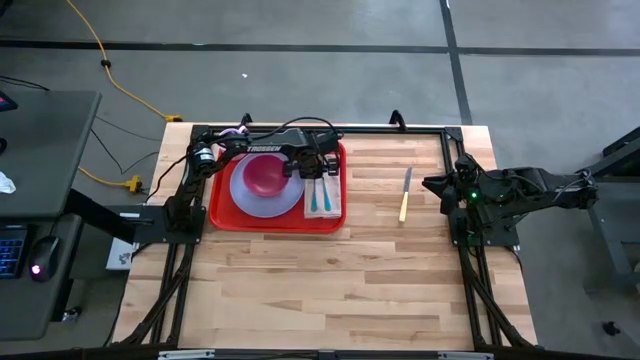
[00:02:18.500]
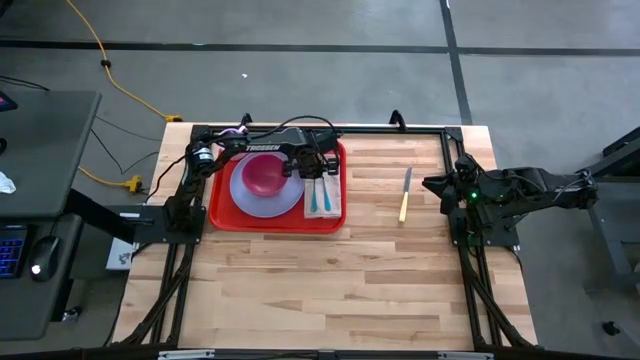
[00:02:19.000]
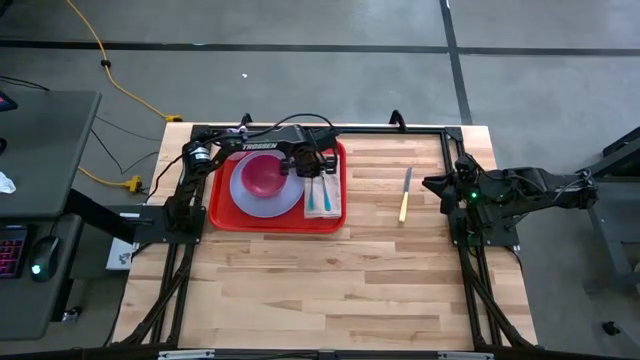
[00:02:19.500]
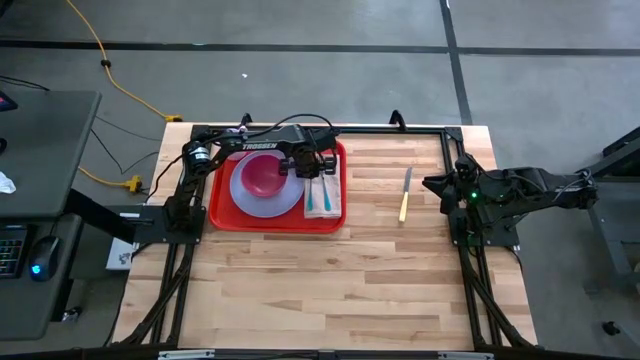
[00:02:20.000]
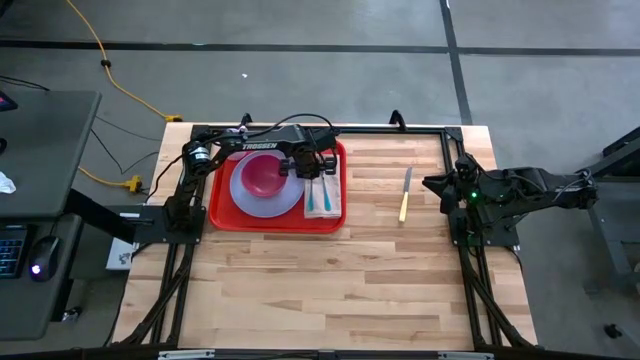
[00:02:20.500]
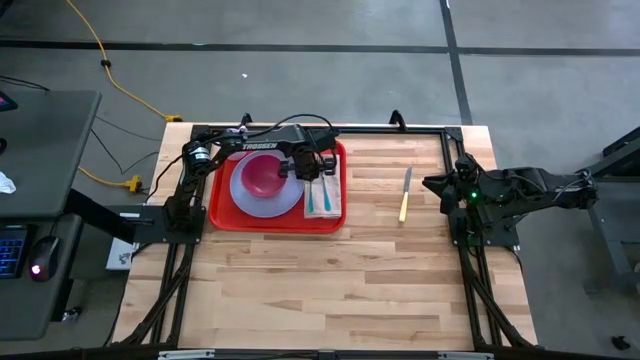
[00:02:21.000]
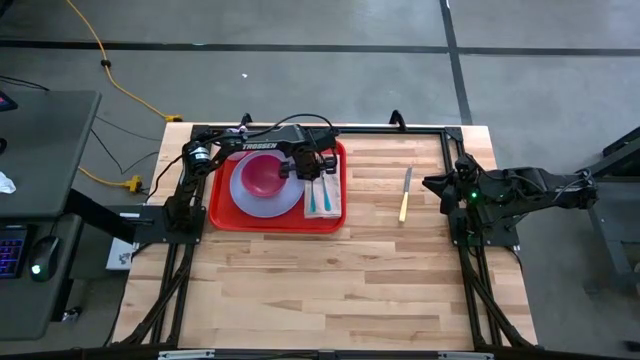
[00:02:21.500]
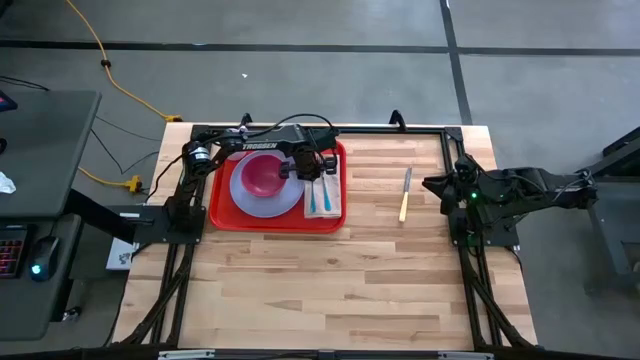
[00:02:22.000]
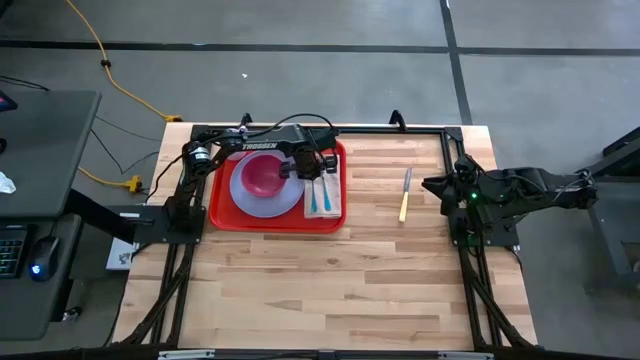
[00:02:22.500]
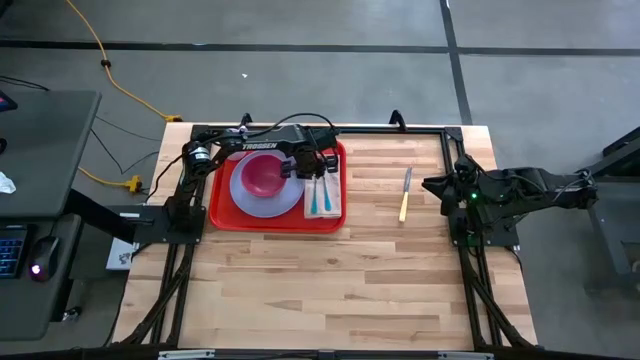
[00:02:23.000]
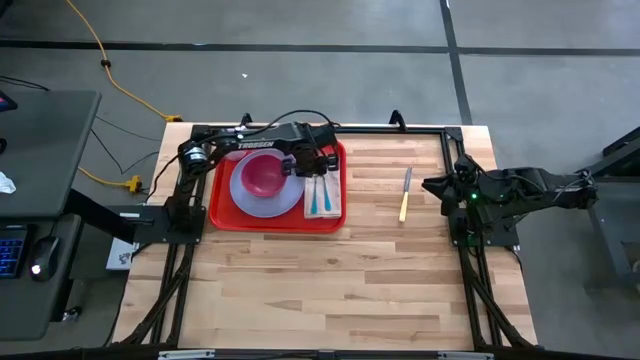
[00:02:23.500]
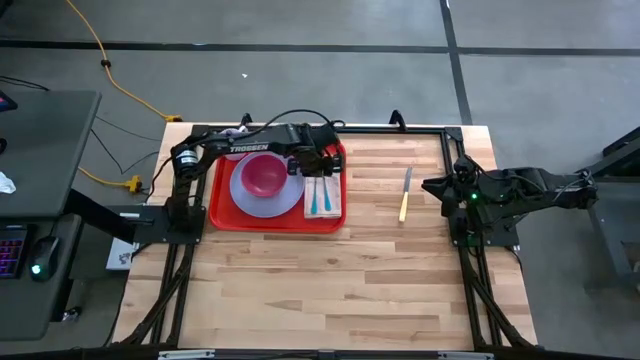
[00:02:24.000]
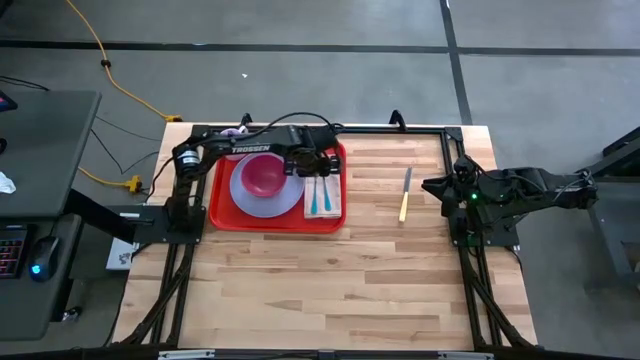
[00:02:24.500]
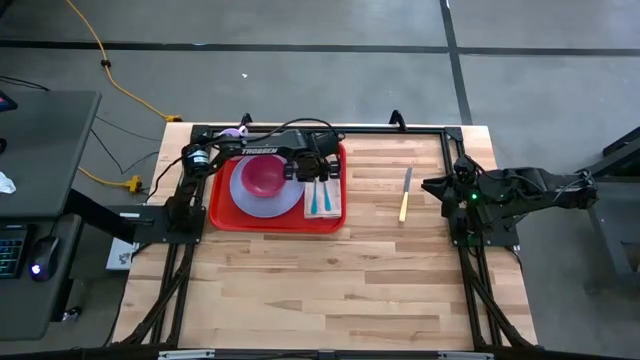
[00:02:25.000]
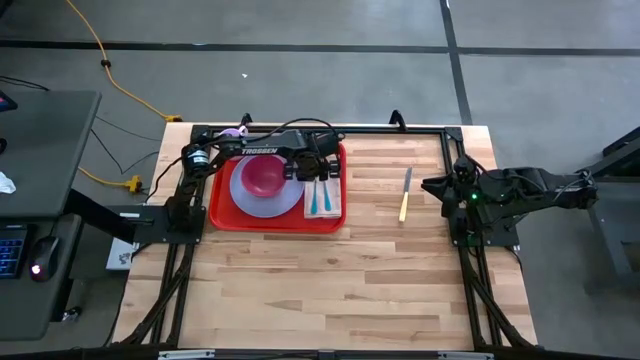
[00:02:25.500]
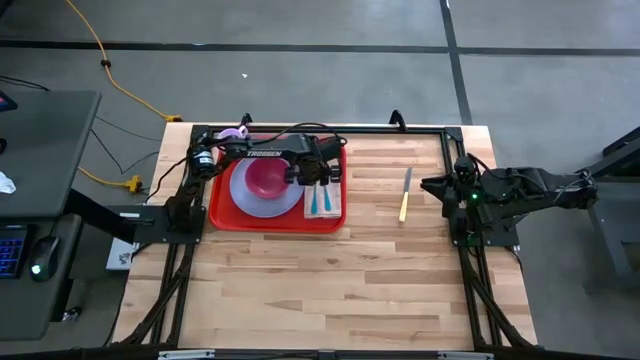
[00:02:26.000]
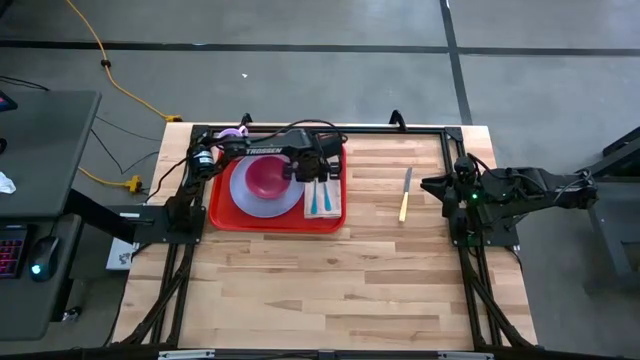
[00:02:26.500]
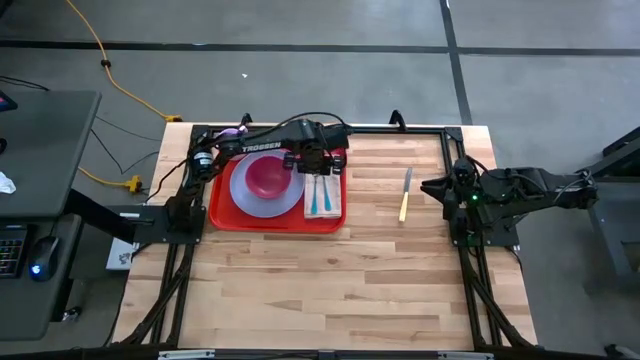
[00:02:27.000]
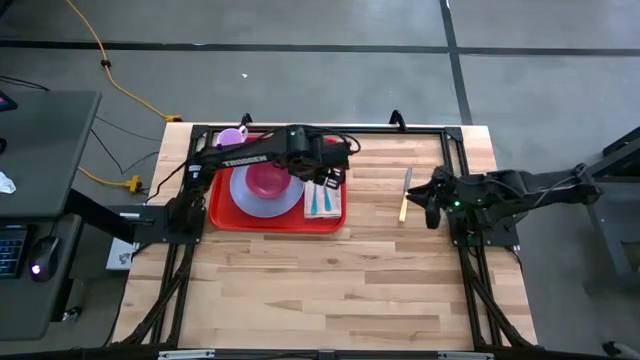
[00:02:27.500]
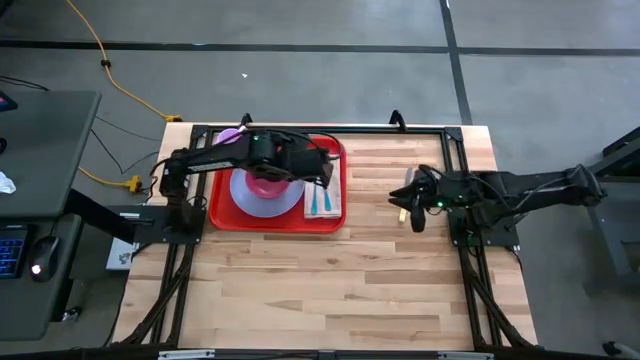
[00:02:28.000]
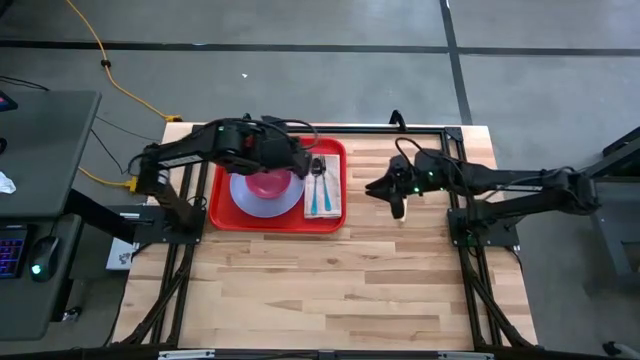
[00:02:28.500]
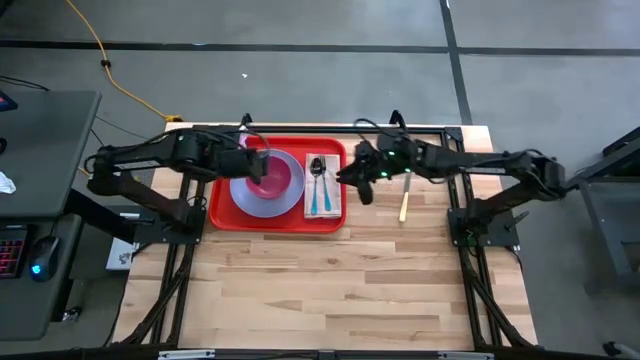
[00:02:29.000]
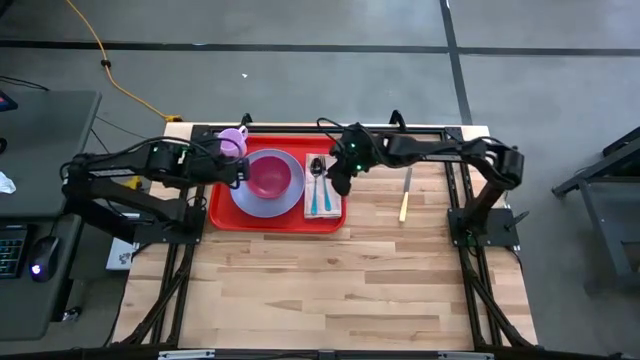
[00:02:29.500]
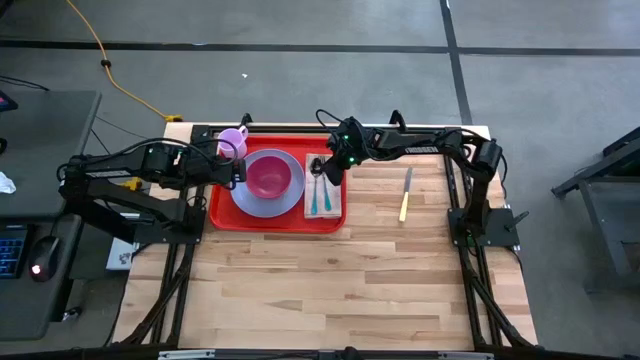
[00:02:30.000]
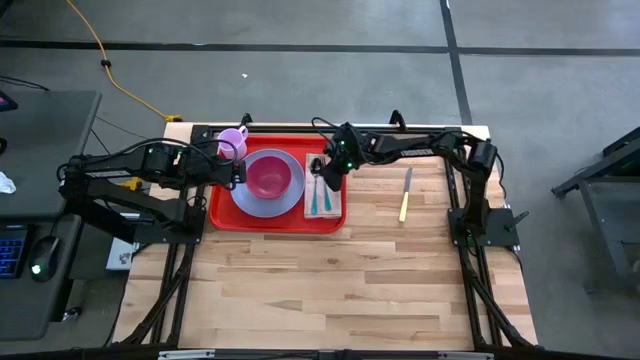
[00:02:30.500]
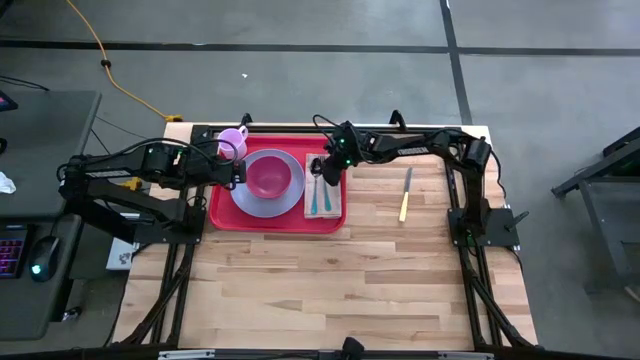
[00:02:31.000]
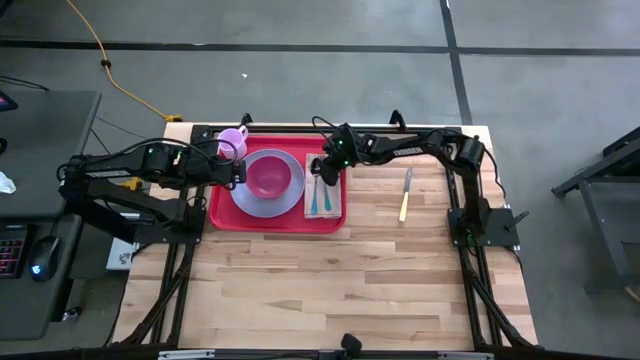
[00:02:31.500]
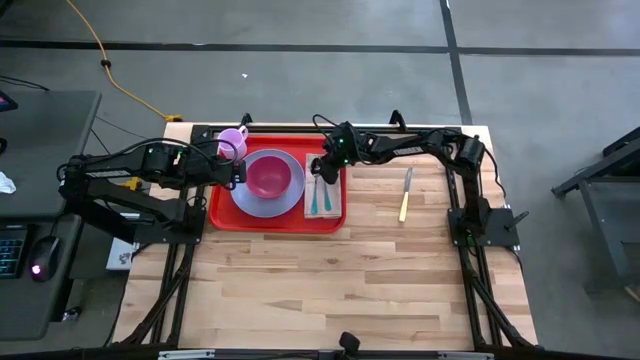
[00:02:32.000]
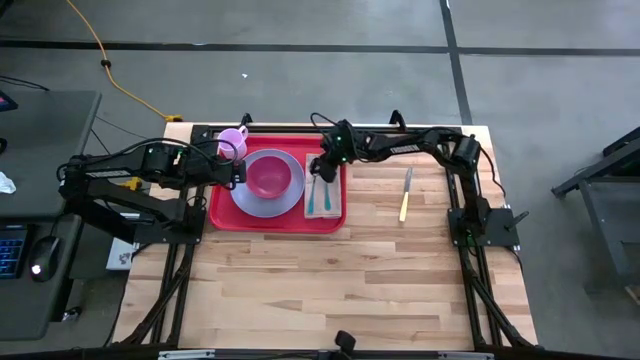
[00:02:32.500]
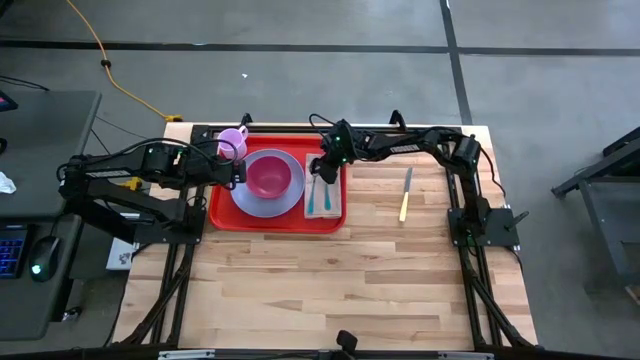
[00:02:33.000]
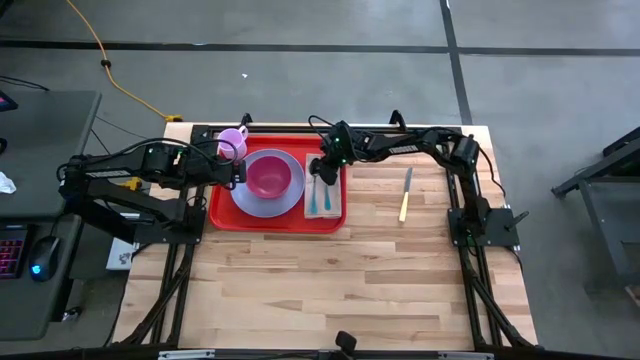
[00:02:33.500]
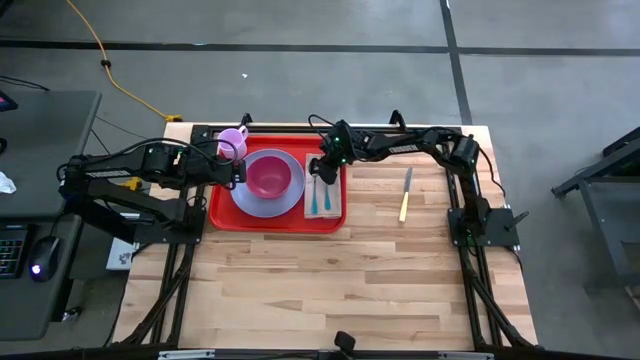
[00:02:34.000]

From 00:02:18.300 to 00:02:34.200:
Task: Set up tray
Put the blue spoon on the white table napkin to the left of the blue fork

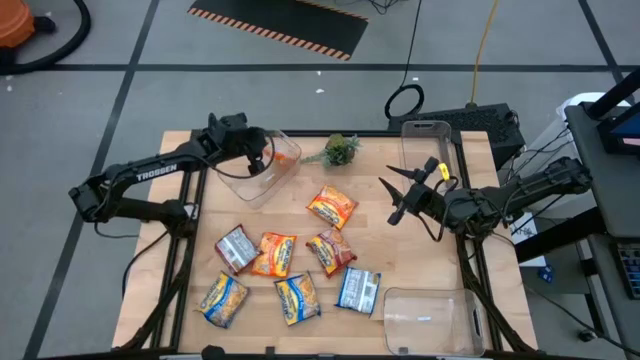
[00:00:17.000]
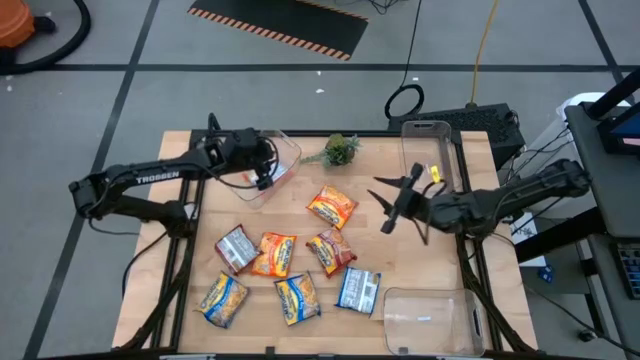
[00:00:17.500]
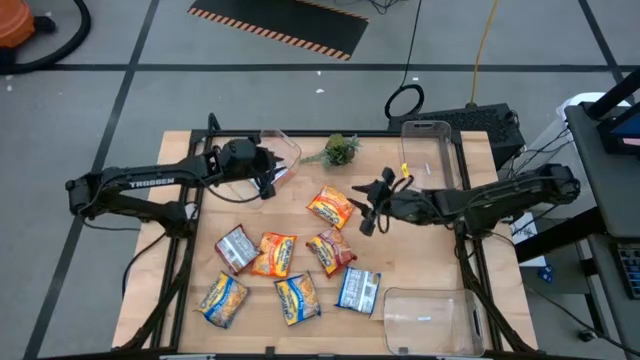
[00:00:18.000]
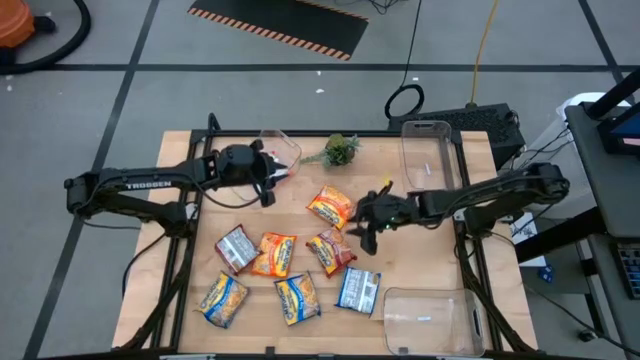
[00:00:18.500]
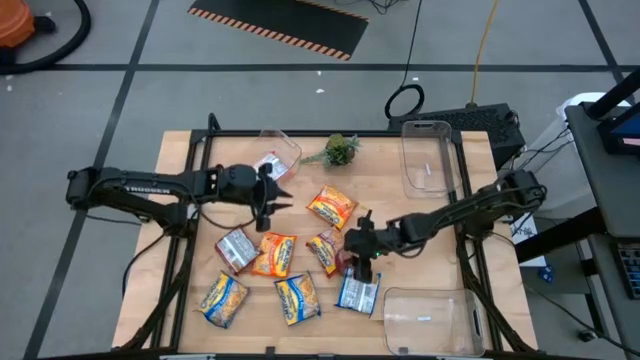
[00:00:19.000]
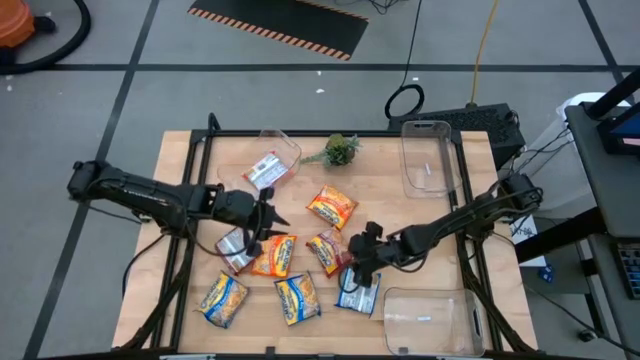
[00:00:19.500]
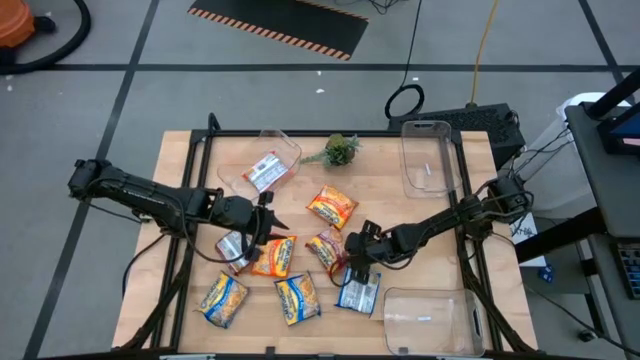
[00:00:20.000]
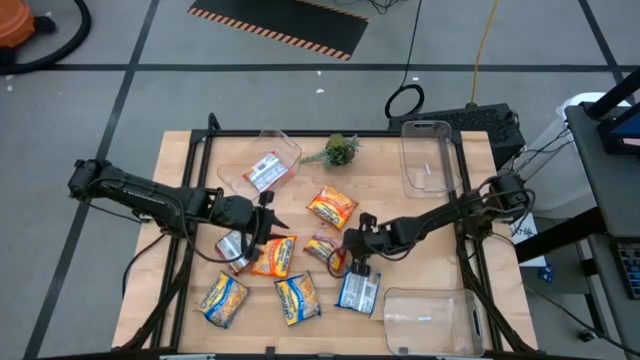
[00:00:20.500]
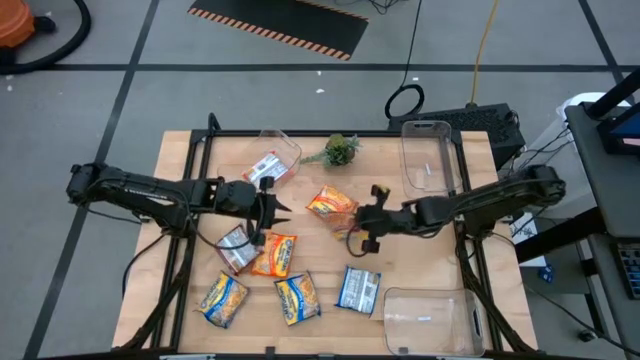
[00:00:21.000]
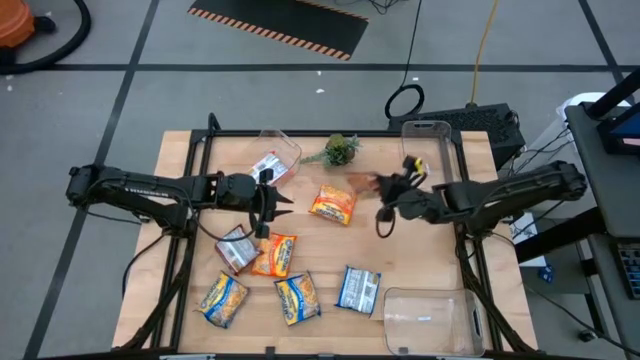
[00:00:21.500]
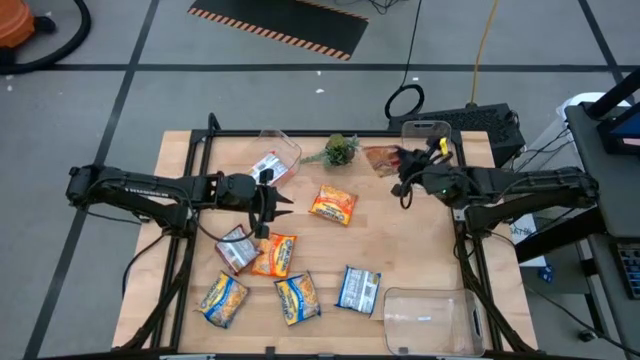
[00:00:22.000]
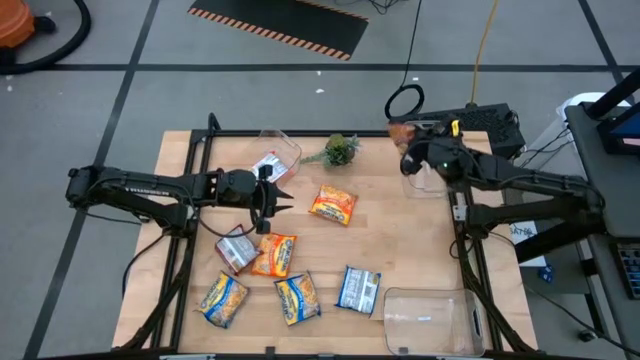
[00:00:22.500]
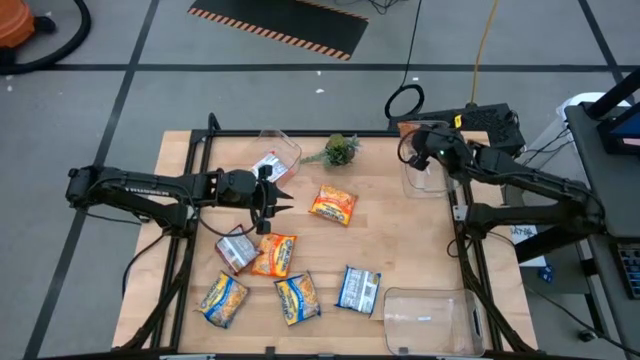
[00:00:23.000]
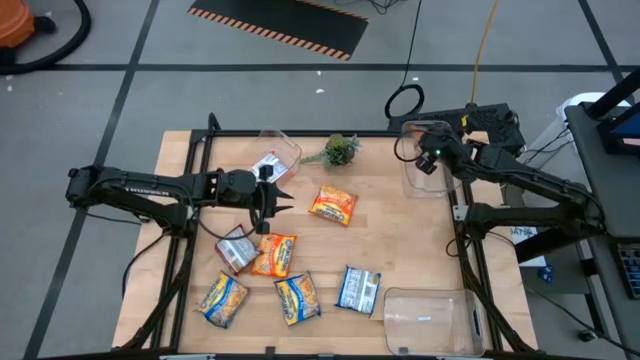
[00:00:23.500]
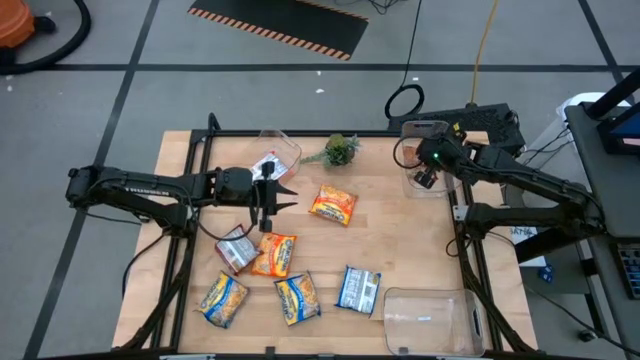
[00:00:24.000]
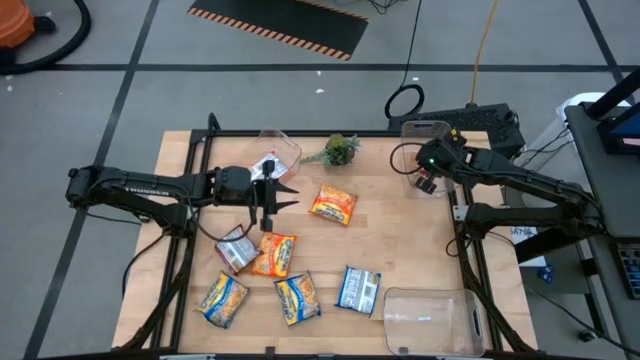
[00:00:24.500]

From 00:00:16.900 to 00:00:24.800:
Task: Sort Maruchan noodles
Put the right red noodle pack into the top right transparent bin
